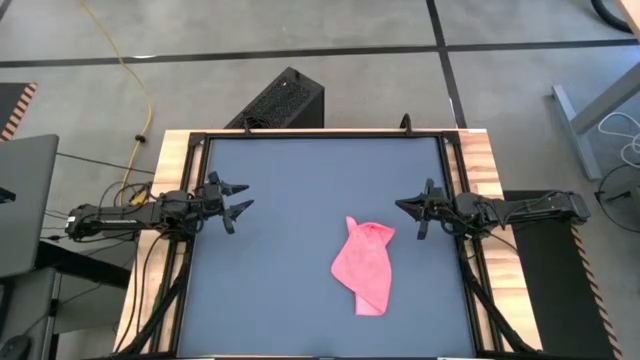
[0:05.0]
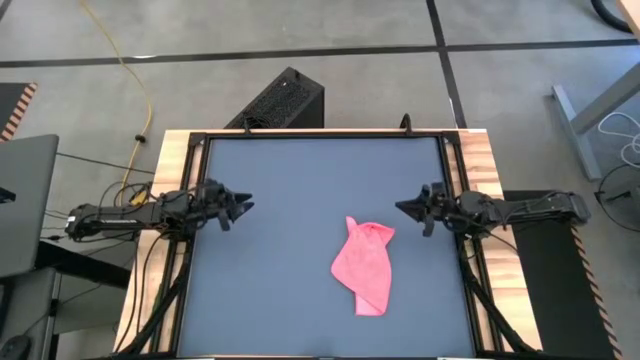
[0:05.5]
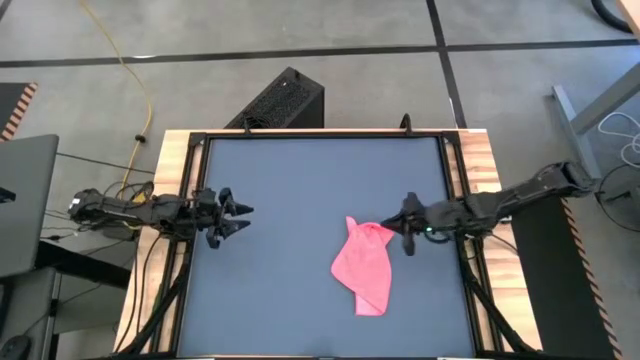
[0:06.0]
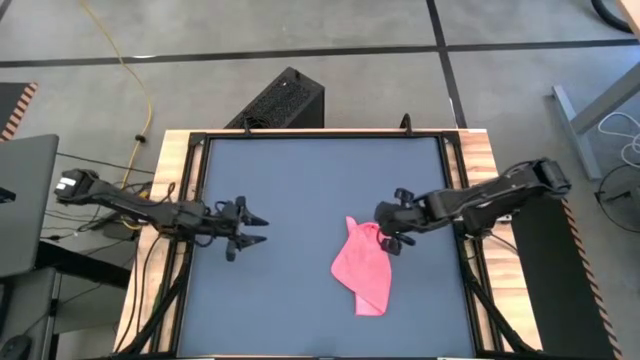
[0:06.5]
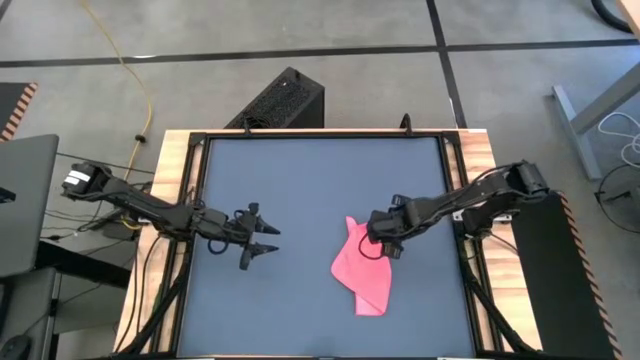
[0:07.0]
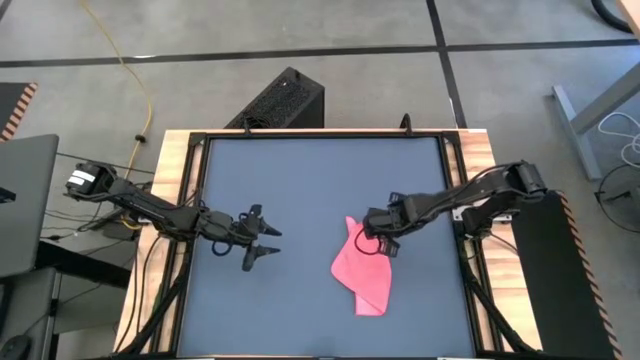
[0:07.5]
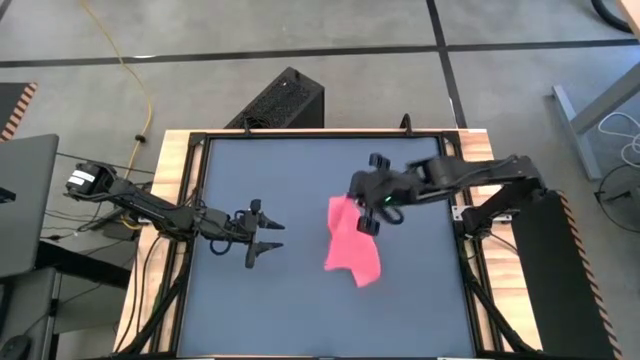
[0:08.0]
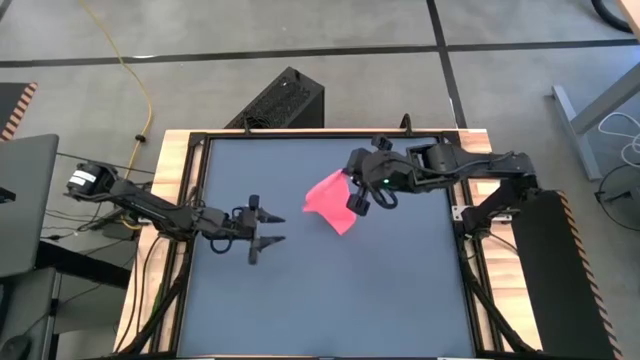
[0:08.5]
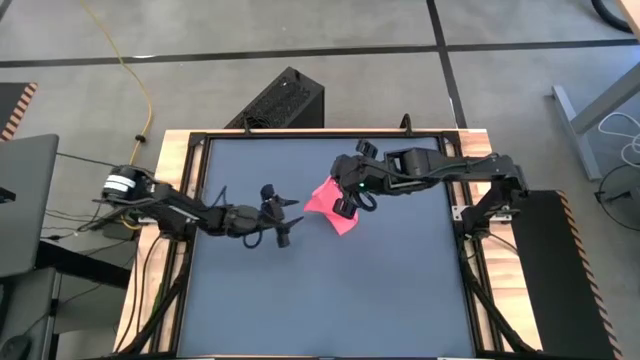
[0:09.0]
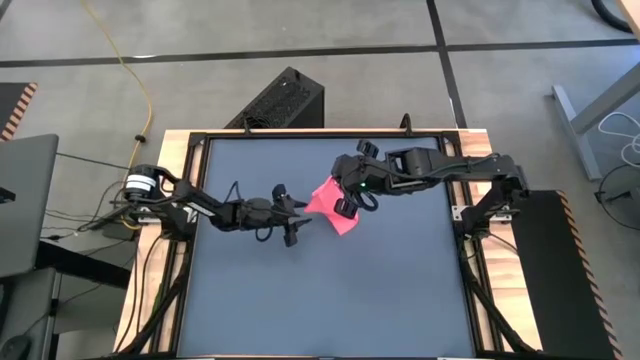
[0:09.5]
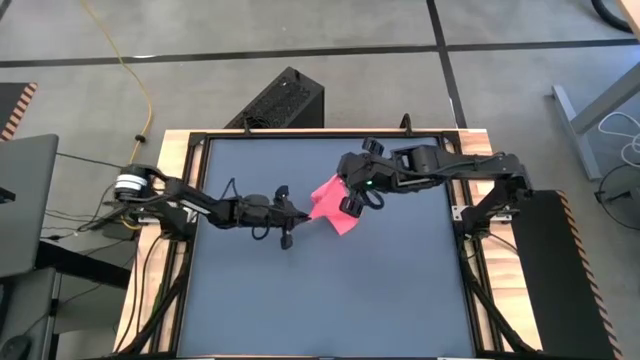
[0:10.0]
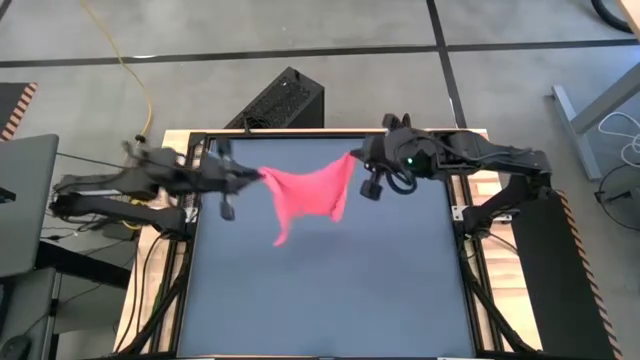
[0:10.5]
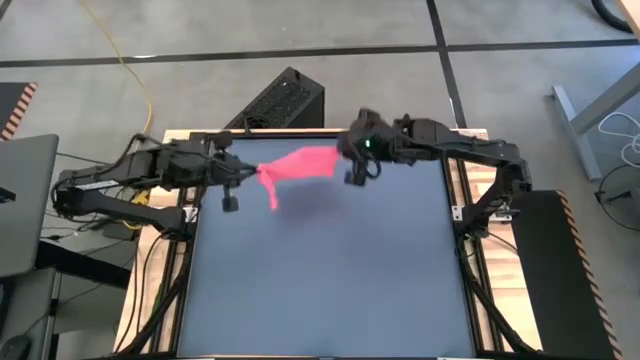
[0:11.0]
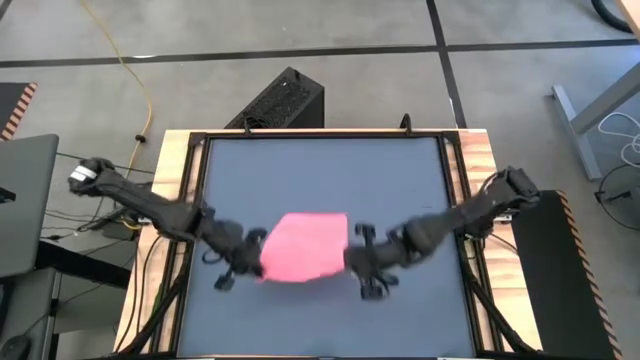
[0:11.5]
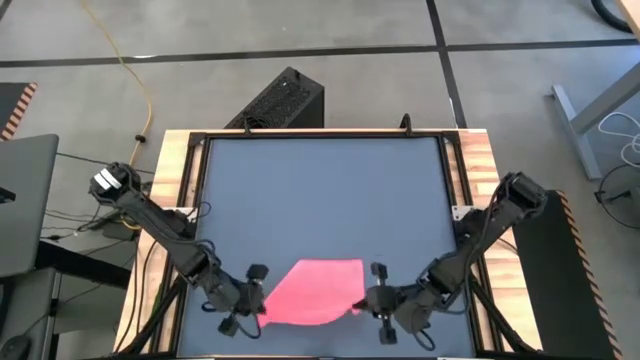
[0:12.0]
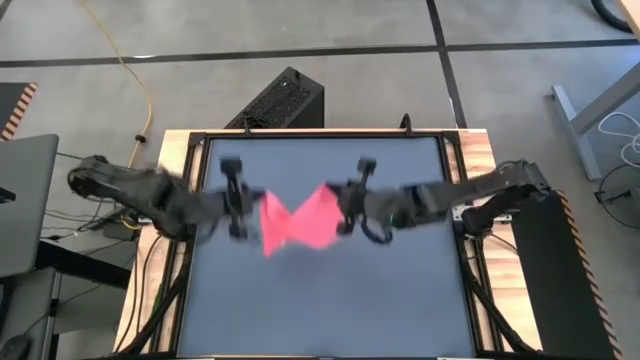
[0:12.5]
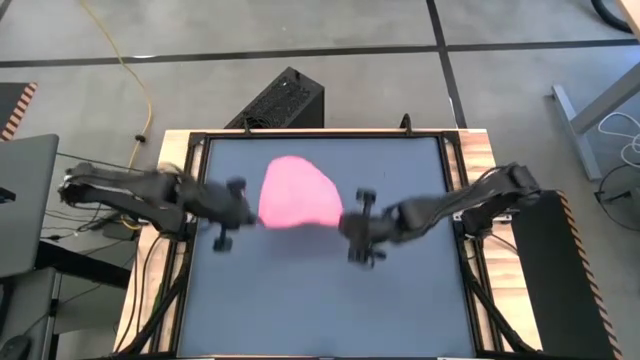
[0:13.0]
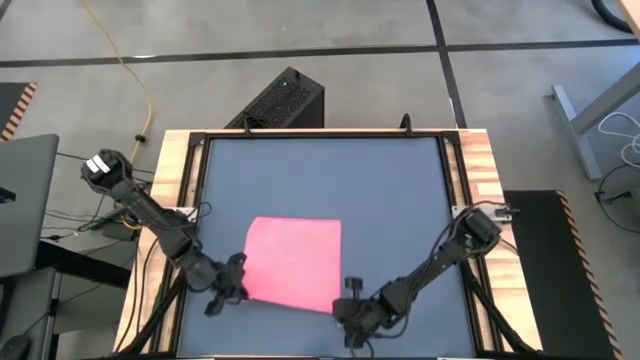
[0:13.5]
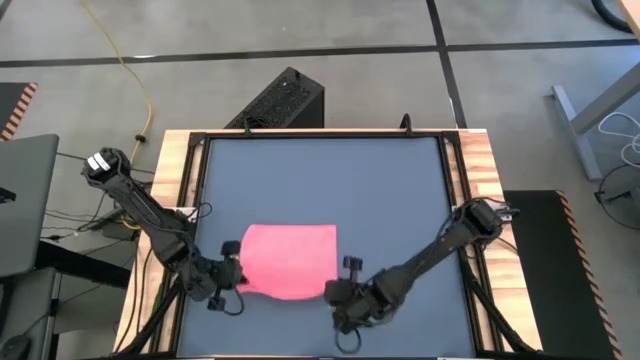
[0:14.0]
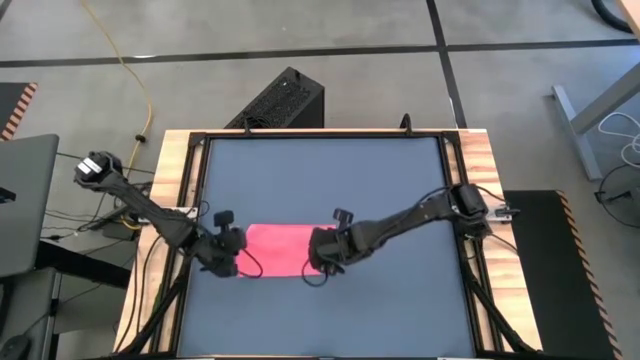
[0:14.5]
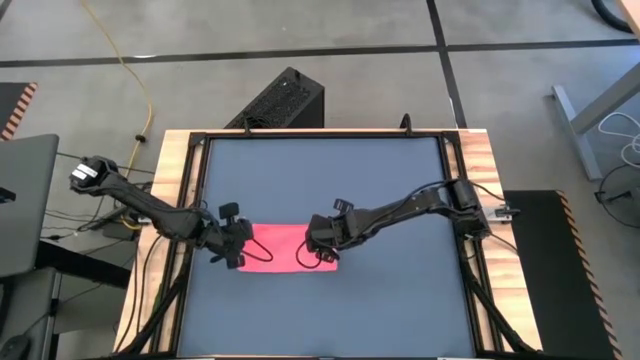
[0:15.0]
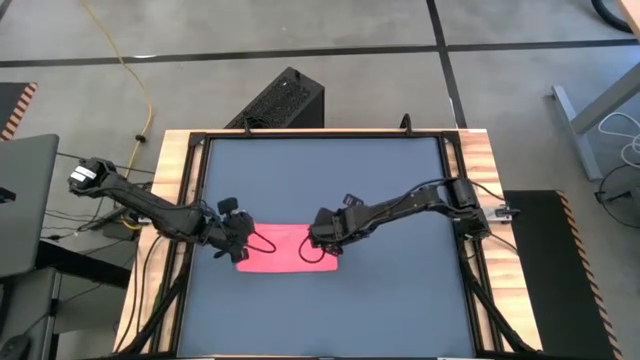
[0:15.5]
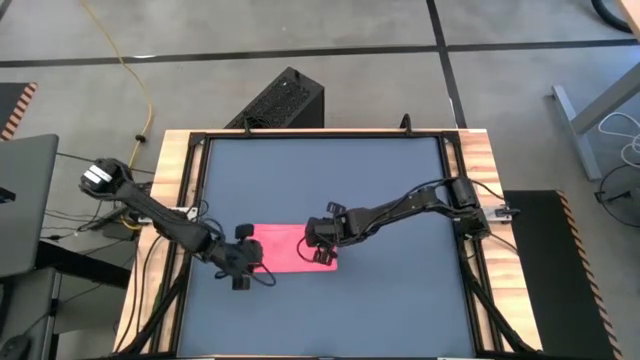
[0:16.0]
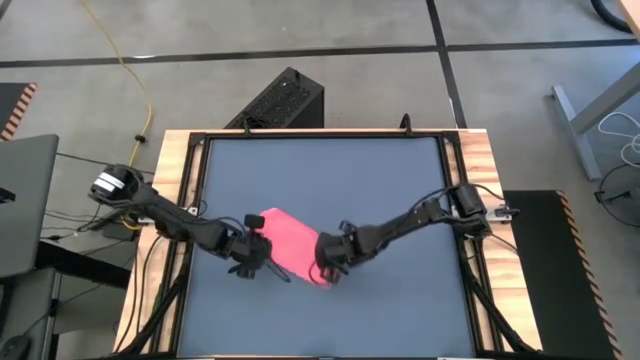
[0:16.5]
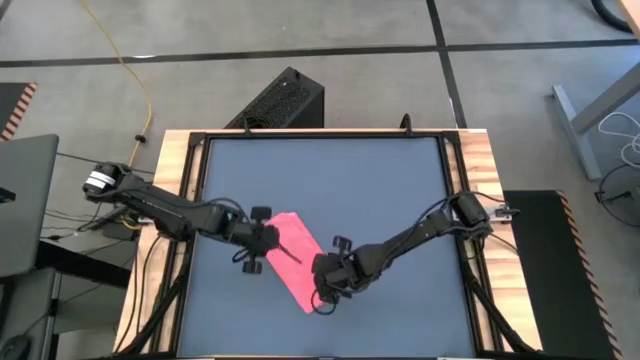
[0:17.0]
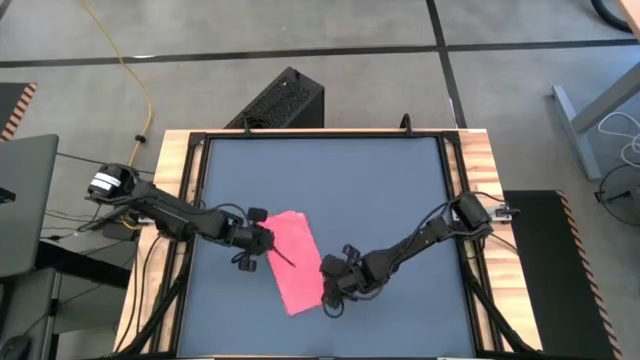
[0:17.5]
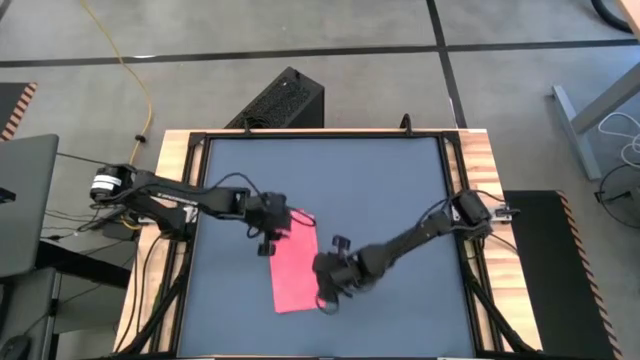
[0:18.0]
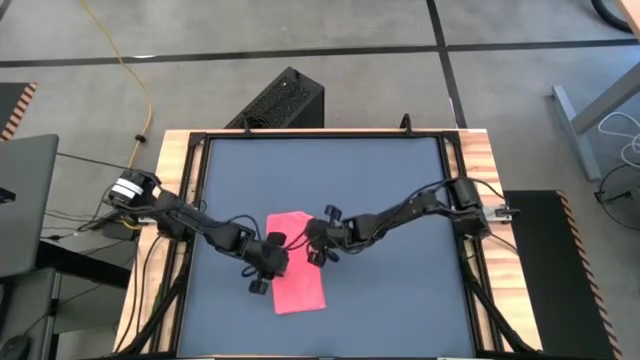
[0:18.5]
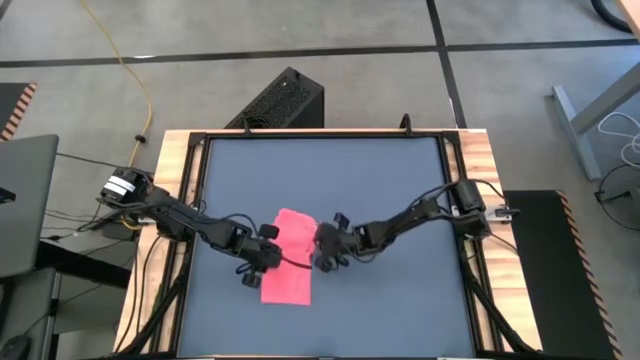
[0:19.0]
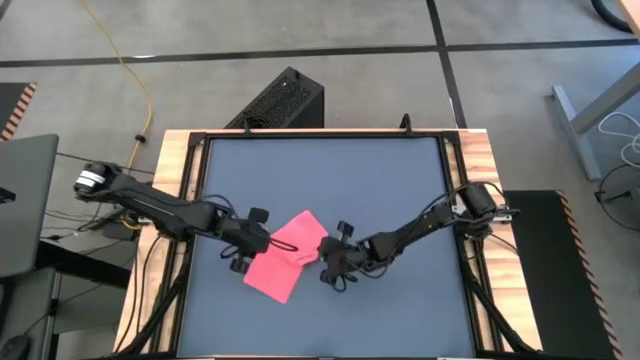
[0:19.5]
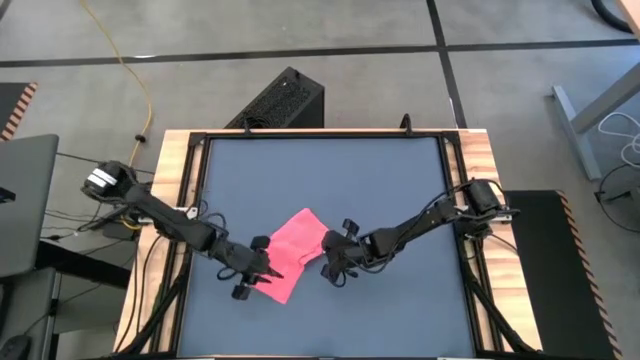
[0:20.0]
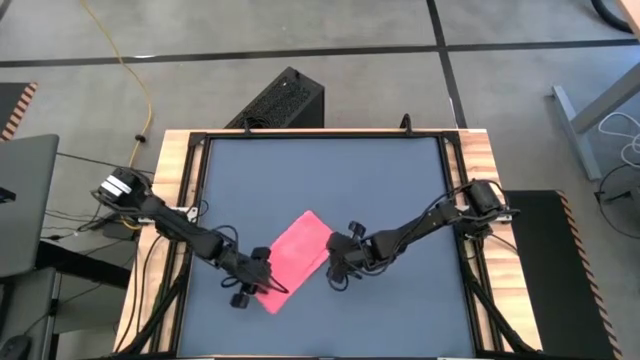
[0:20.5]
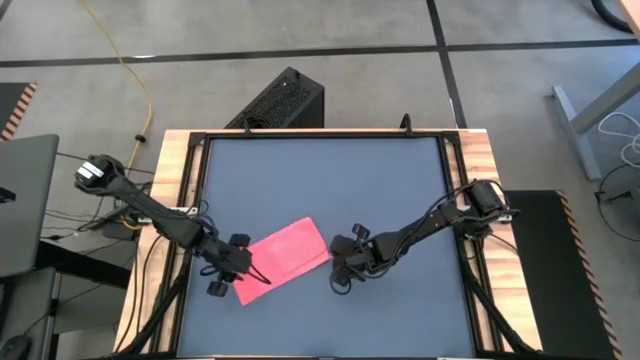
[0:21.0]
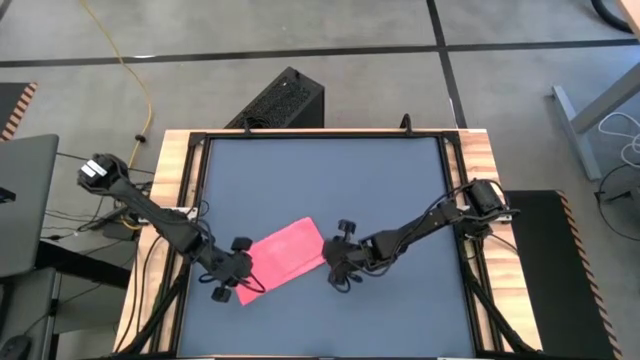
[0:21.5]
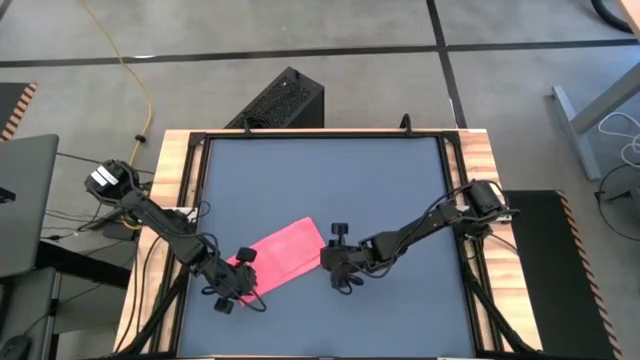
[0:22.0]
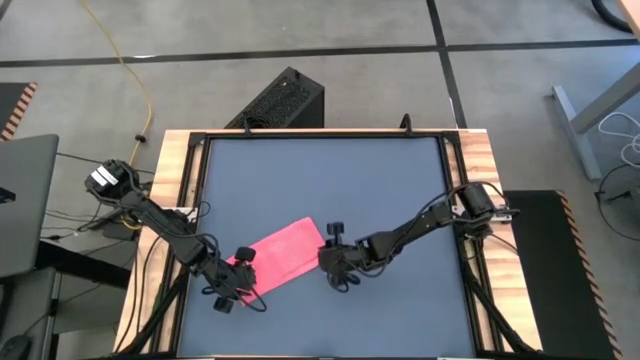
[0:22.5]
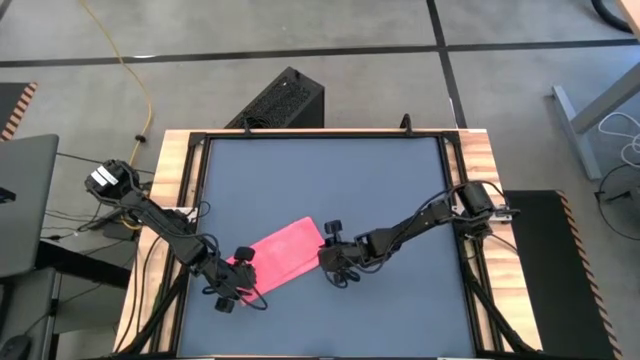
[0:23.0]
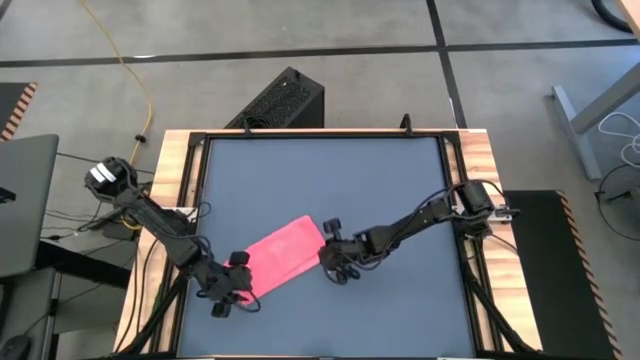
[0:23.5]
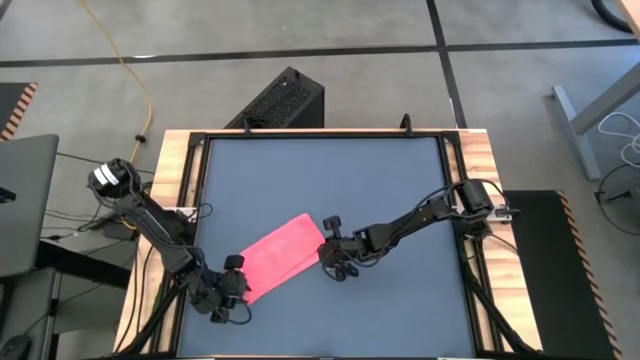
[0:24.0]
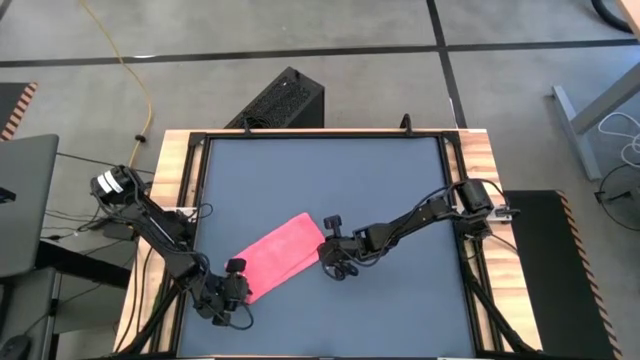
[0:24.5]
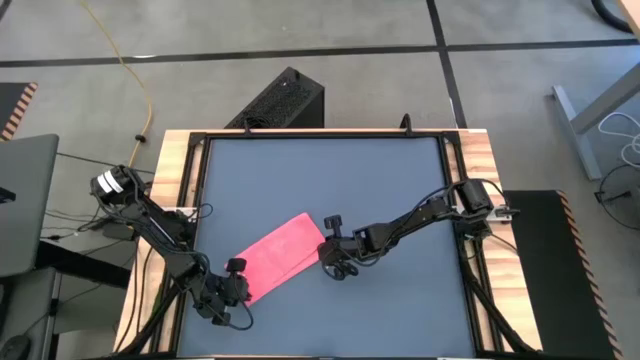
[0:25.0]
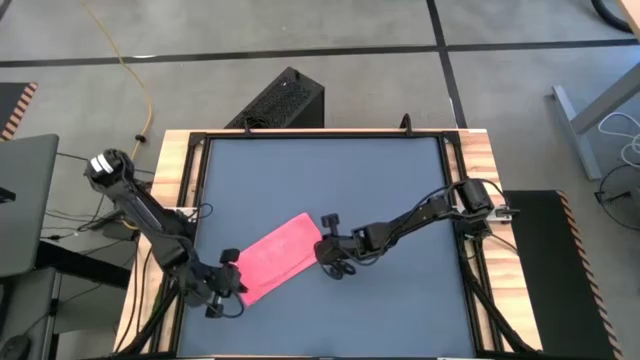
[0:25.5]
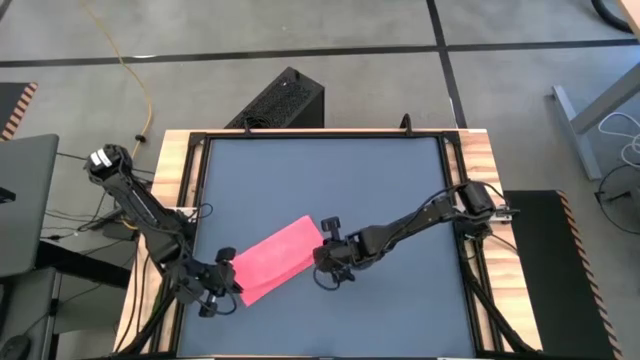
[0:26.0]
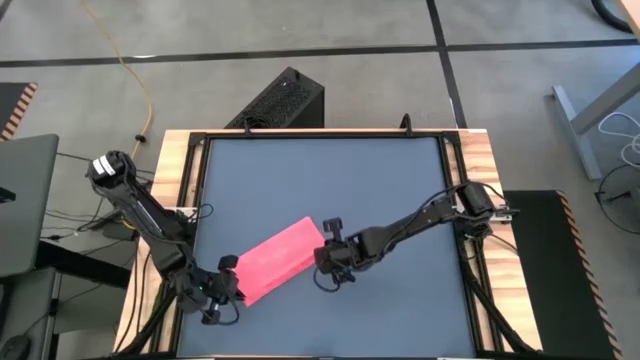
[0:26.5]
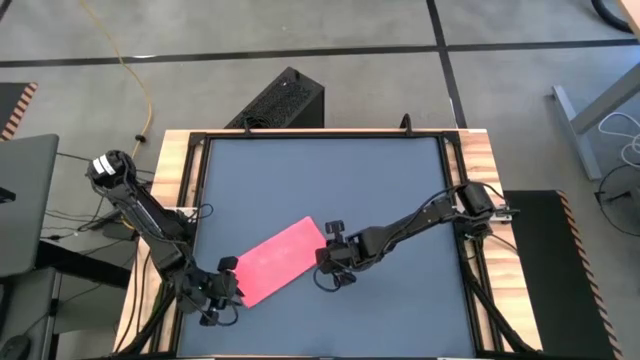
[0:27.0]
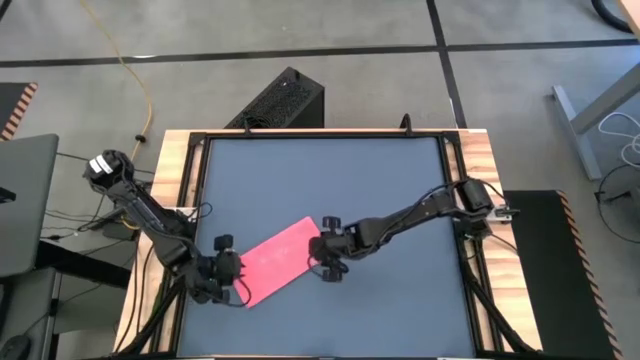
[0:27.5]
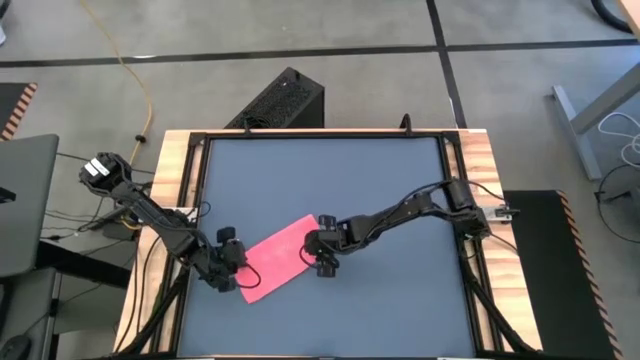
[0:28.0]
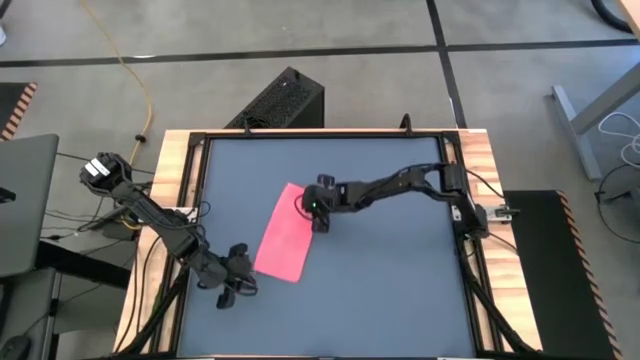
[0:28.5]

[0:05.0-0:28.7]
Task: Roll towel
Fold the pink towel
